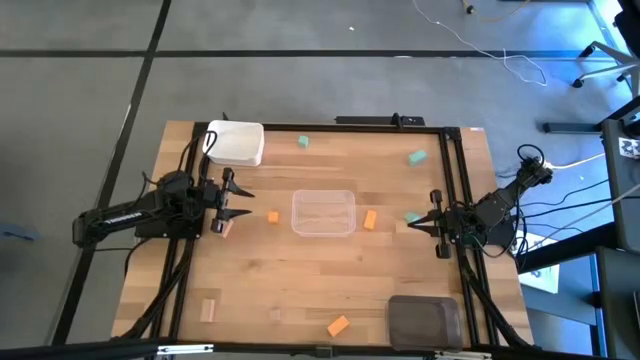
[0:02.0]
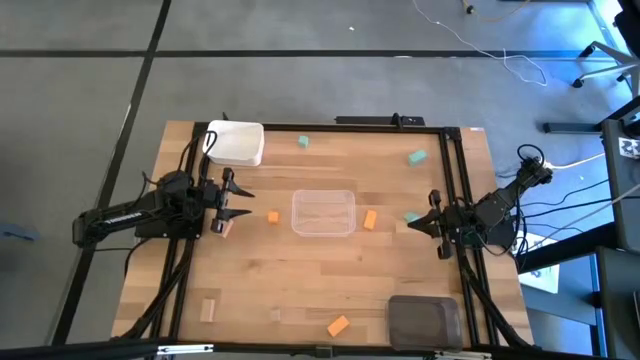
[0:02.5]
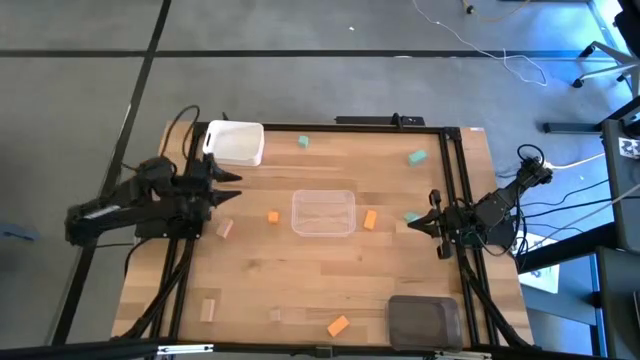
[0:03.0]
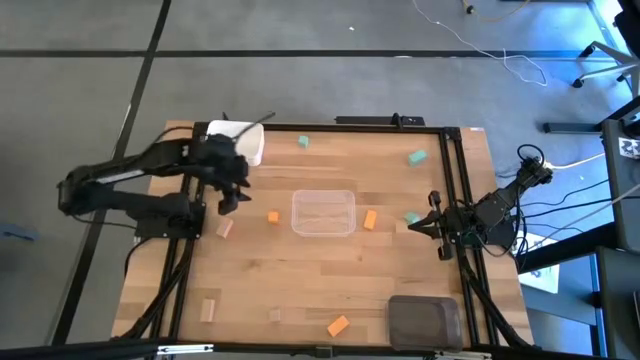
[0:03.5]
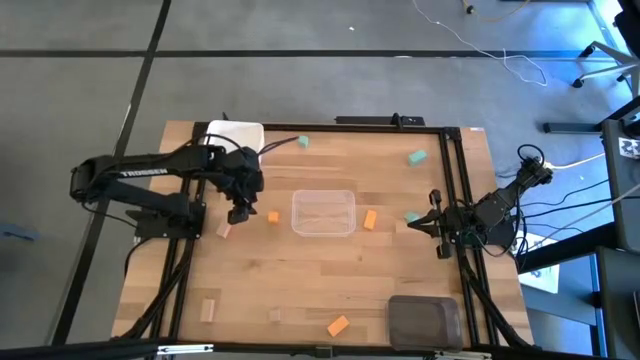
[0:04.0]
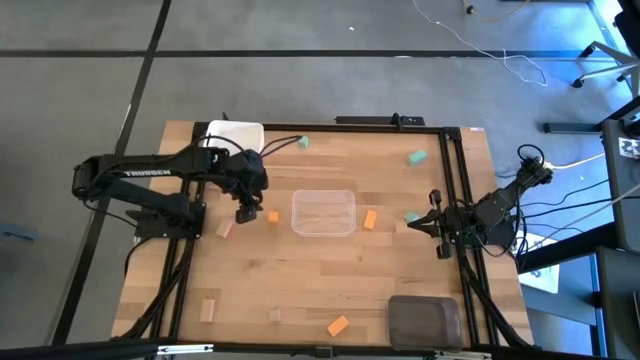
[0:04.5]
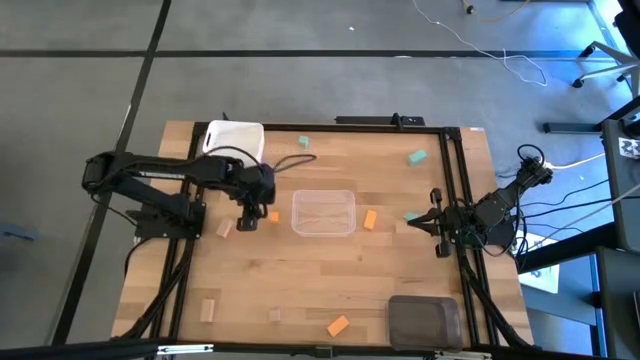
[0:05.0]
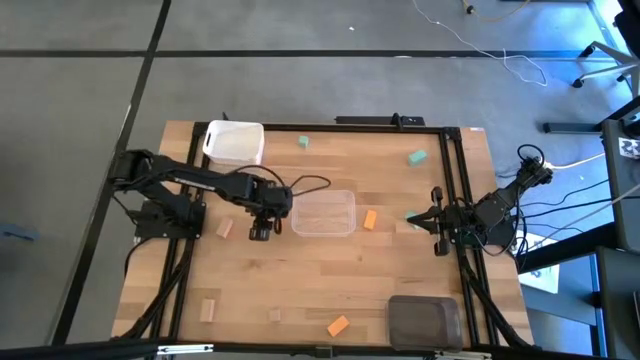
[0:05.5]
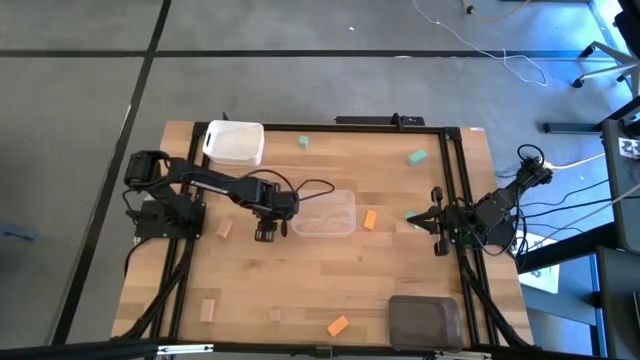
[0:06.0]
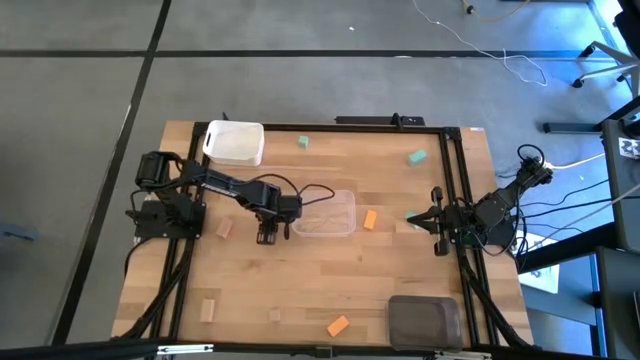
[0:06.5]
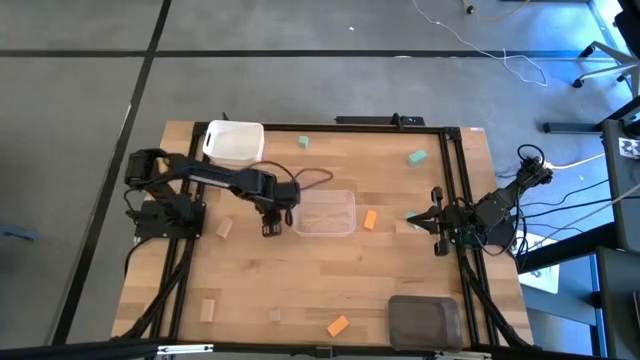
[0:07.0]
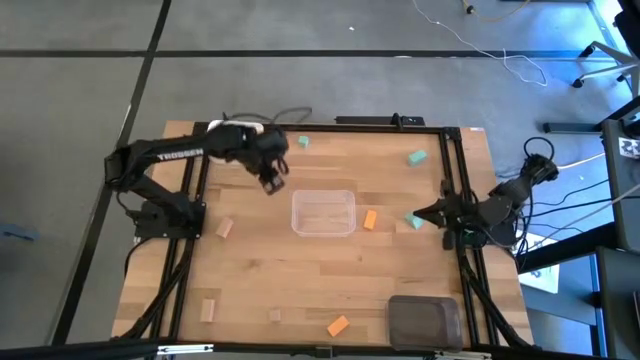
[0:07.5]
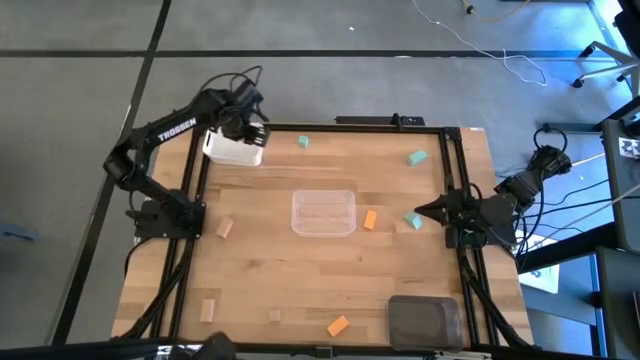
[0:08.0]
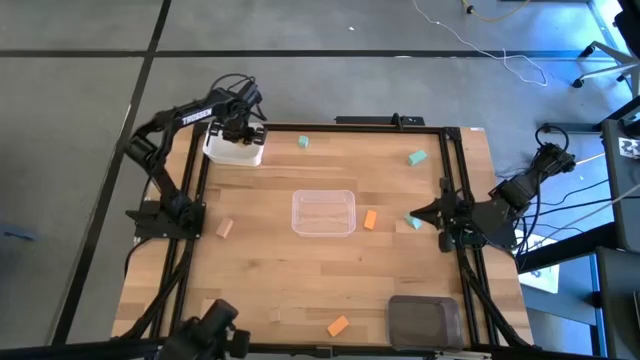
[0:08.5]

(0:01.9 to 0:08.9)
Task: Sort & place blocks by color
Put the top left yellow block into the white bin

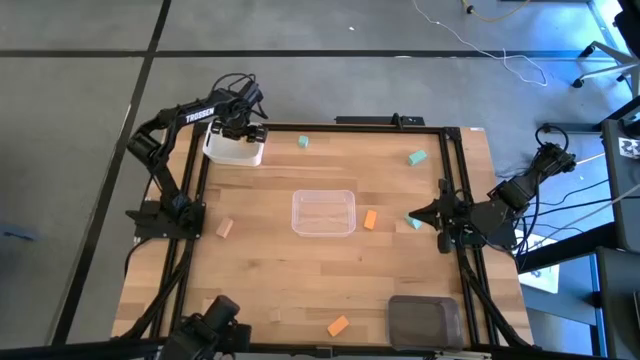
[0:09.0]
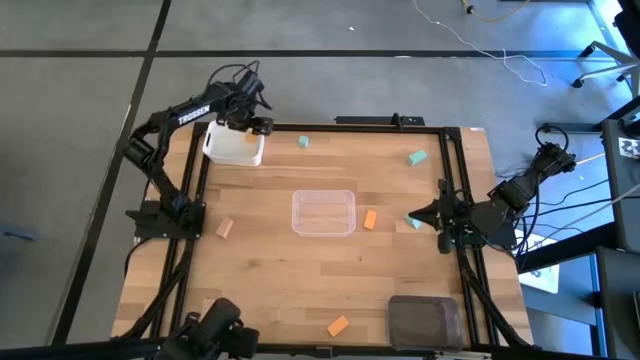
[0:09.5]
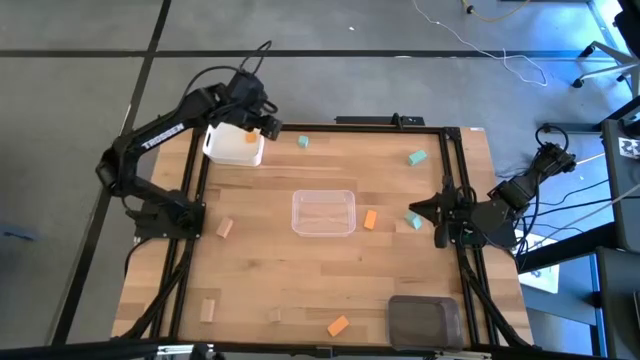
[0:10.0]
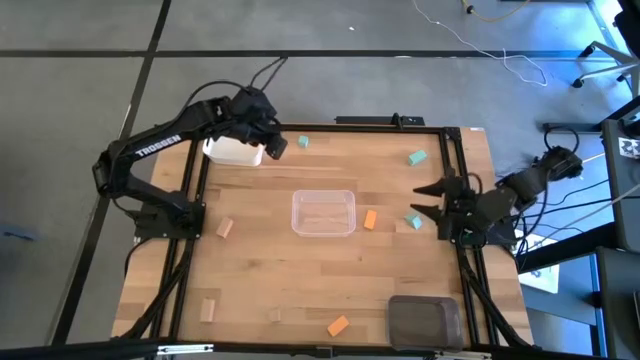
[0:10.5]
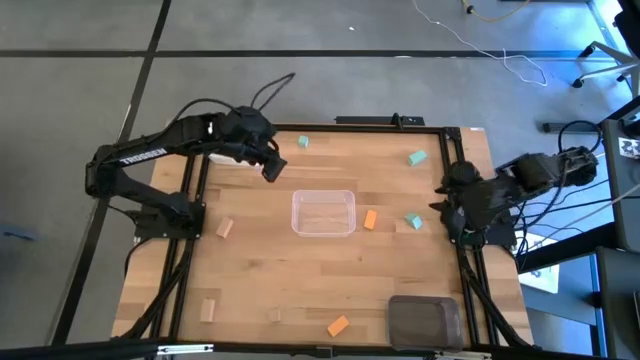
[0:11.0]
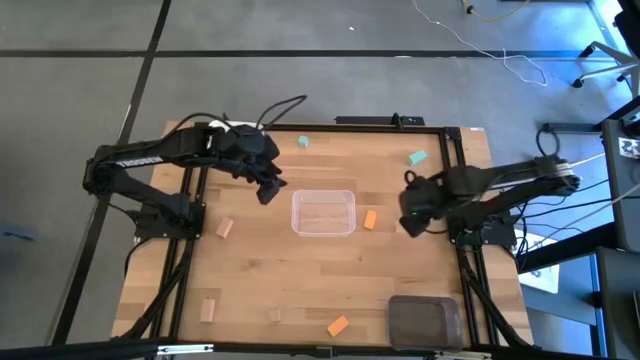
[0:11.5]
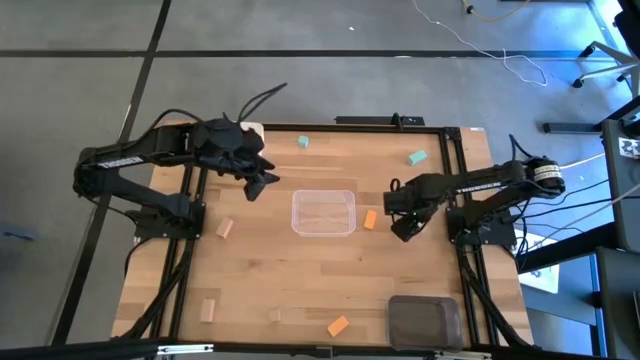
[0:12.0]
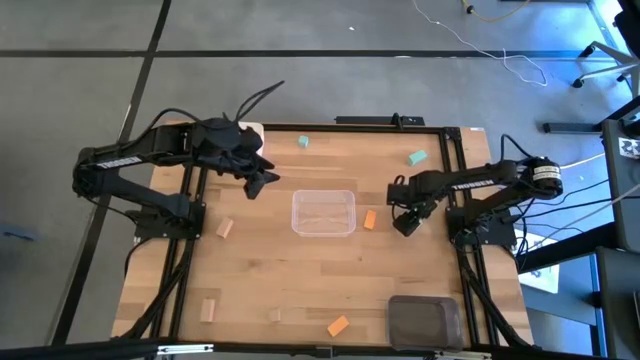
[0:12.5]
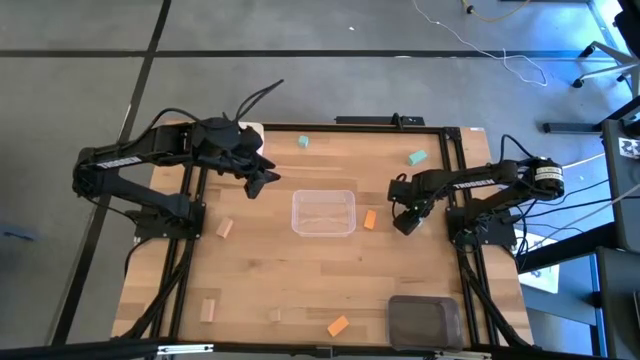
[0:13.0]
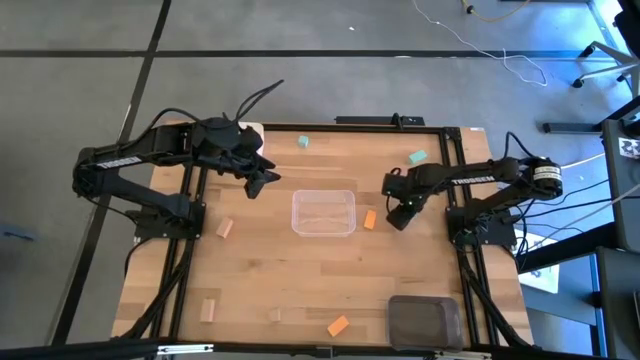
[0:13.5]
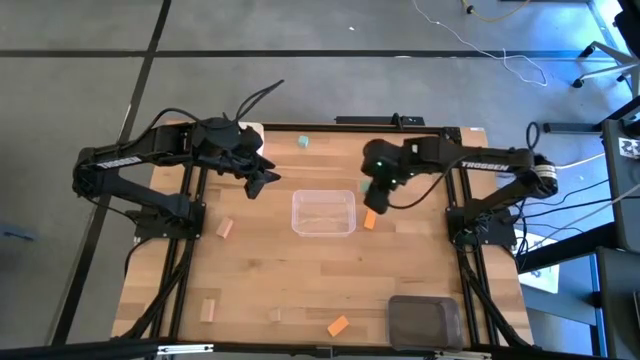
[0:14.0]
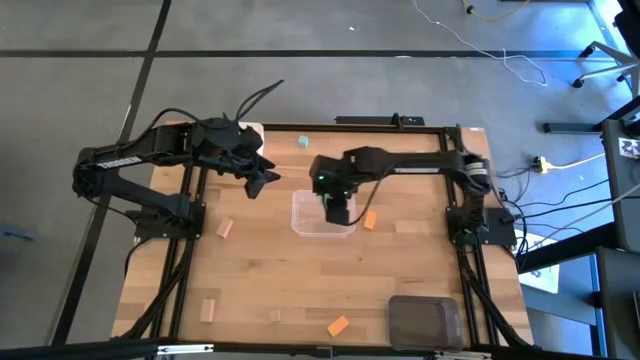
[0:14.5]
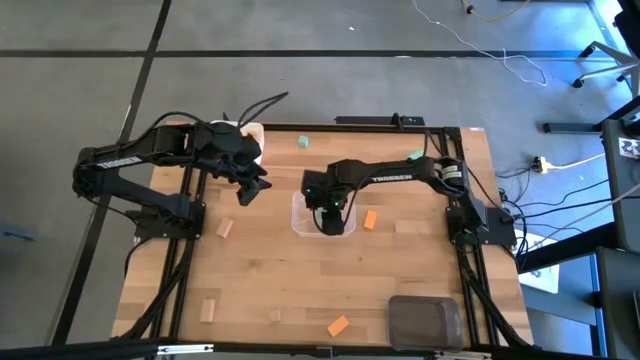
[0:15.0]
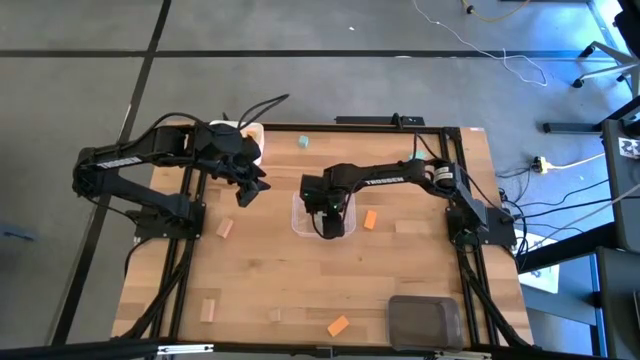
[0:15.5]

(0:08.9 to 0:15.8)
Put the bottom blue block into the transparent bin

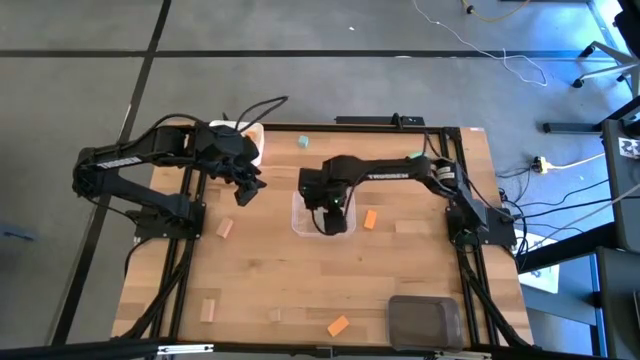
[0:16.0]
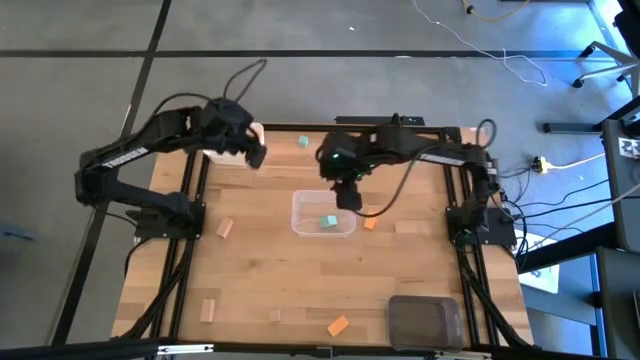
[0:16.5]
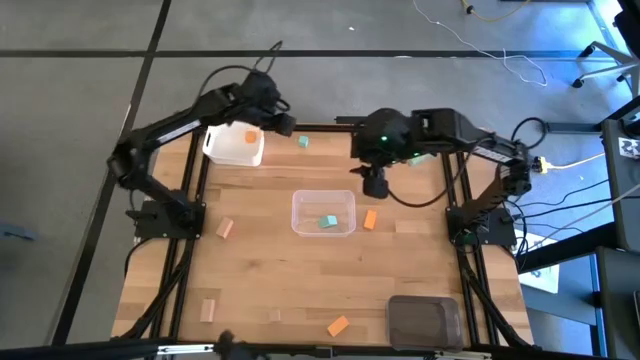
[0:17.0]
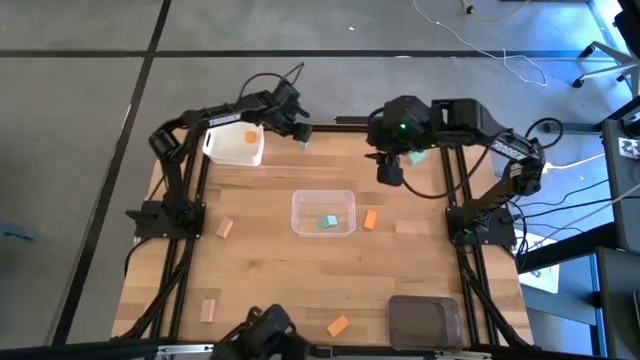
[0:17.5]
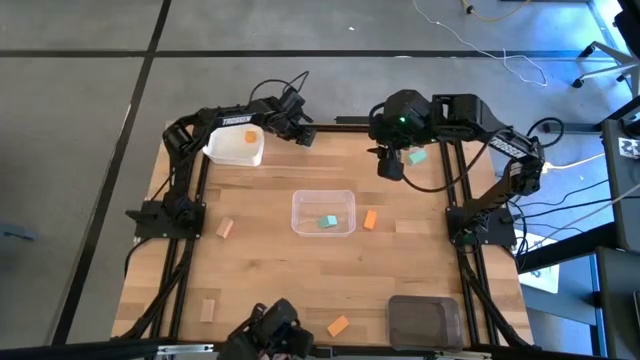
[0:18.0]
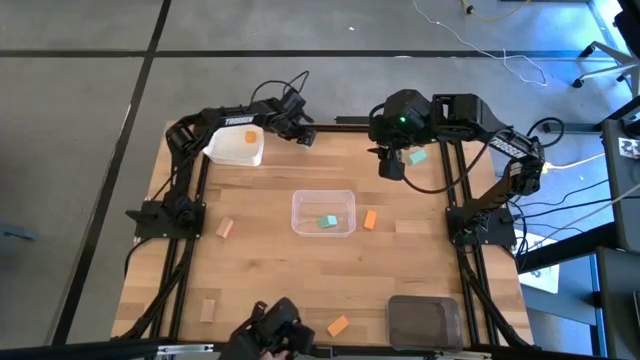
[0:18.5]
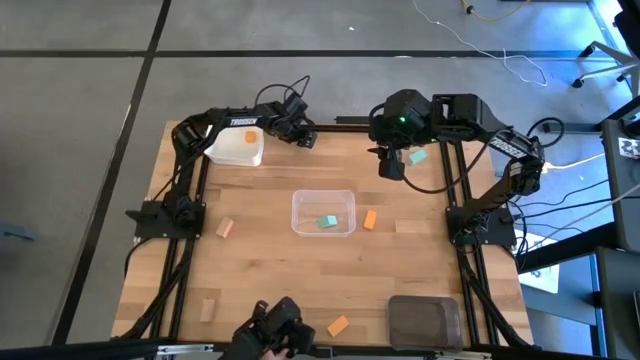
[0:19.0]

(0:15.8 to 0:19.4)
Put the left blue block into the transparent bin

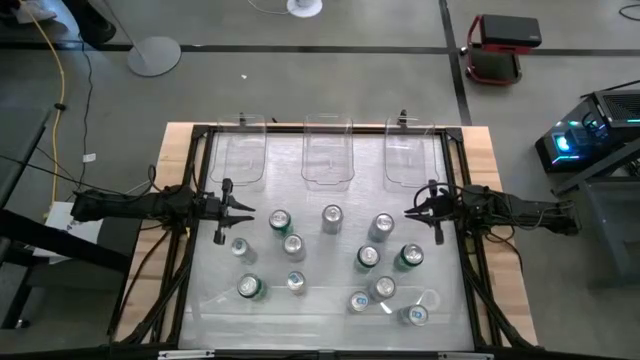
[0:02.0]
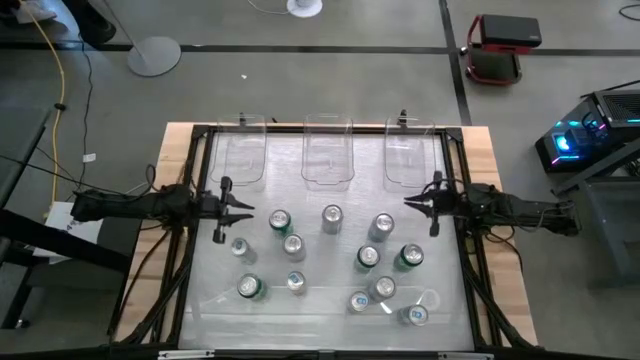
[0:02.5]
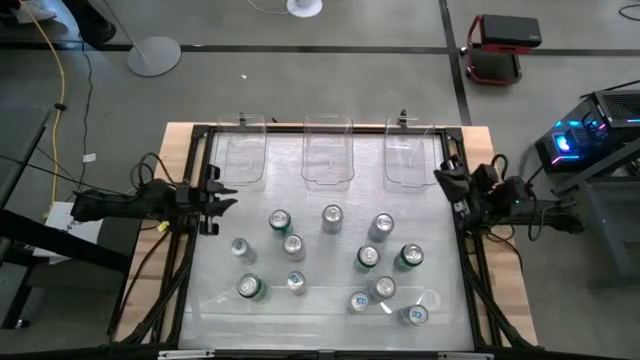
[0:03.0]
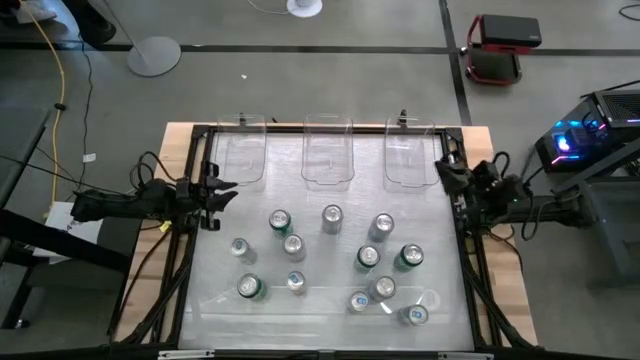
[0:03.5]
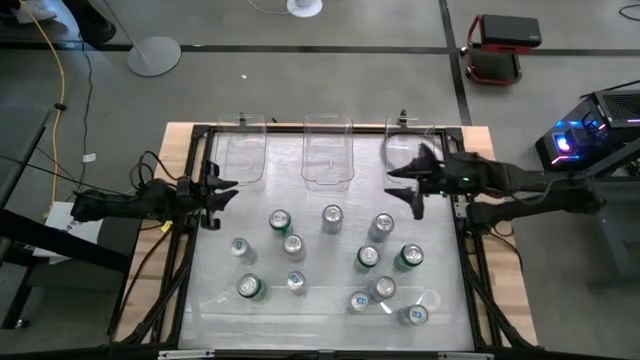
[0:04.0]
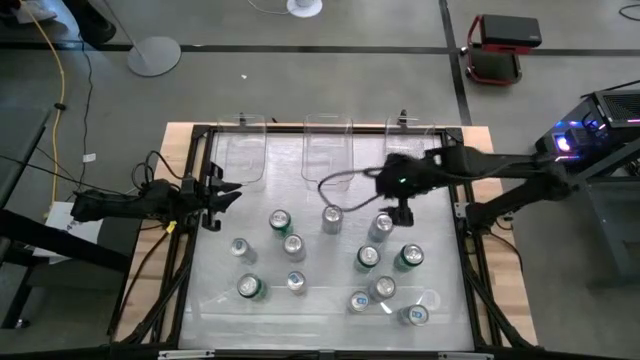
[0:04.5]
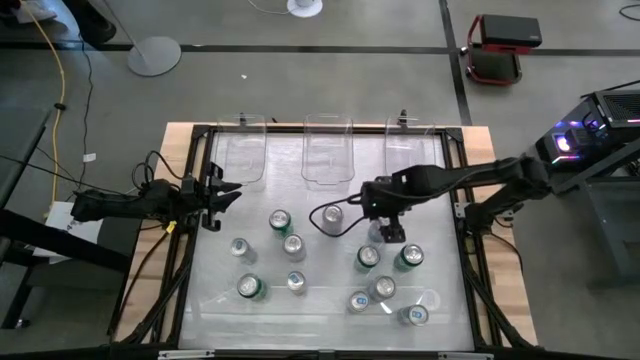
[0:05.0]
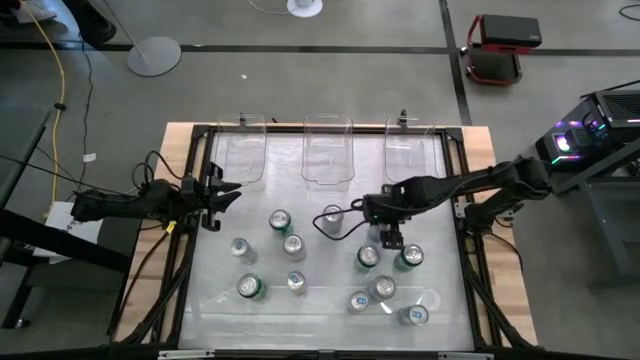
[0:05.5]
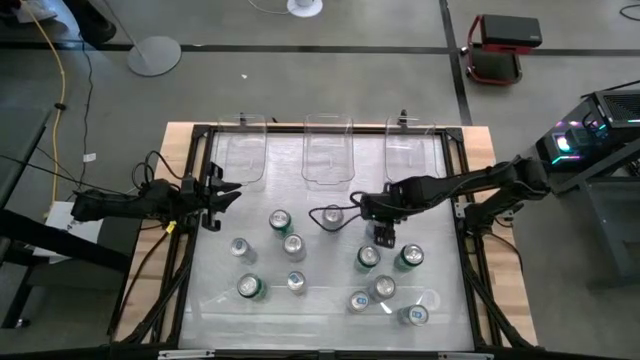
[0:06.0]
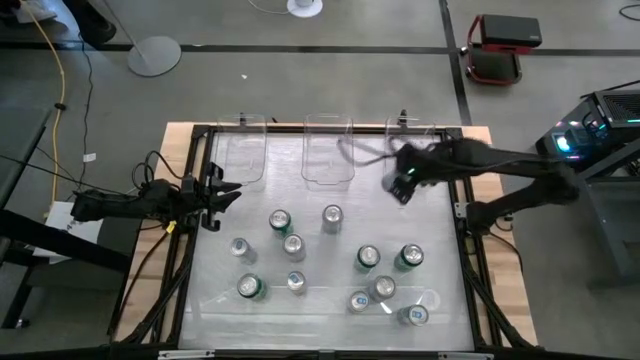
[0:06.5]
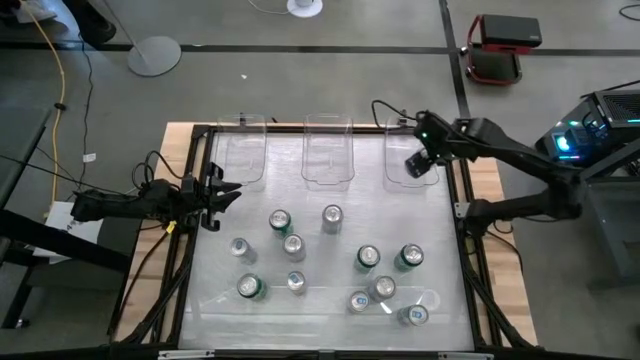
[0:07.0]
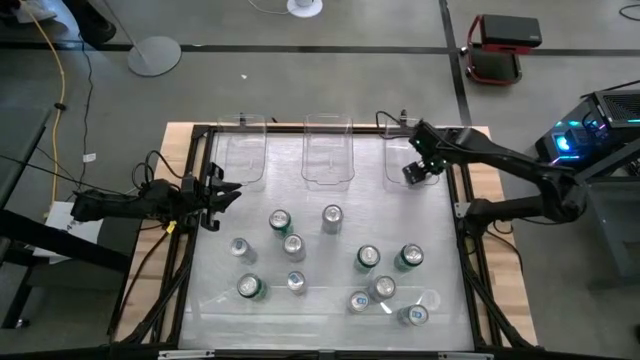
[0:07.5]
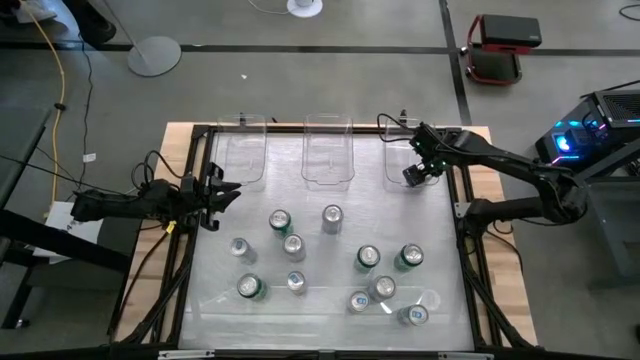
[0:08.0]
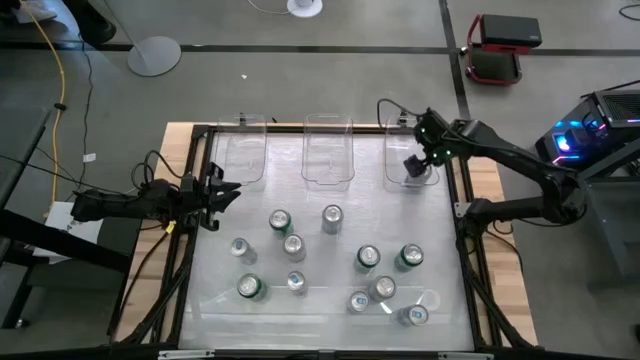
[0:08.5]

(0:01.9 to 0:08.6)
Task: Sort soda cans
Put the top right blue-white soda can into the right transparent bin
